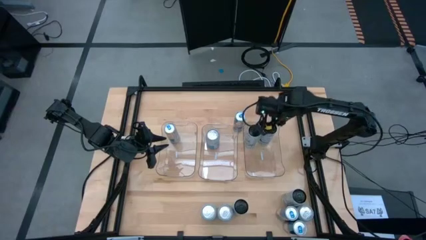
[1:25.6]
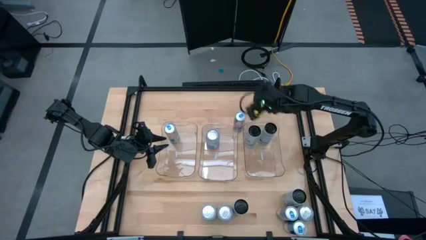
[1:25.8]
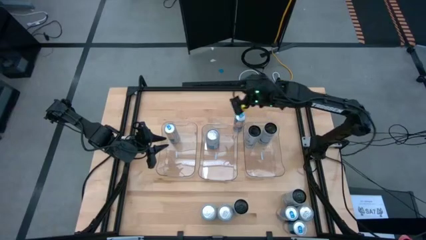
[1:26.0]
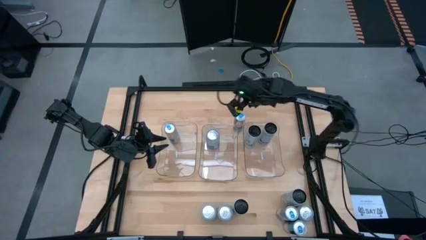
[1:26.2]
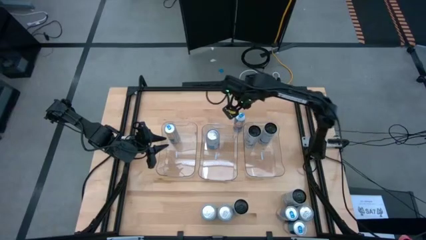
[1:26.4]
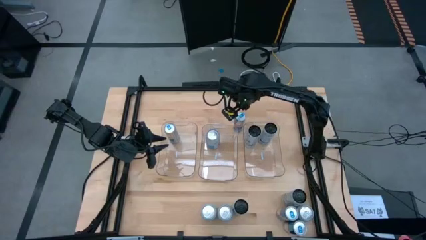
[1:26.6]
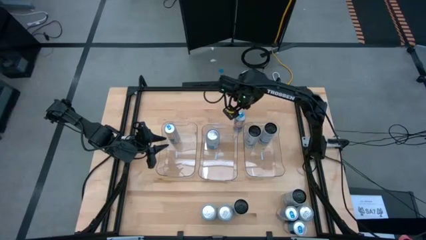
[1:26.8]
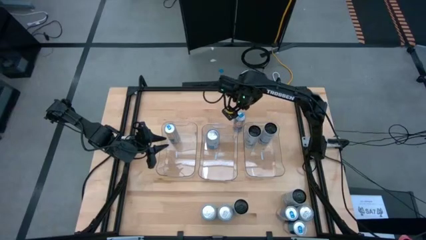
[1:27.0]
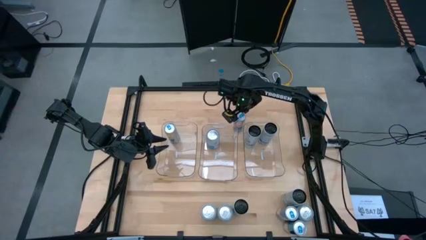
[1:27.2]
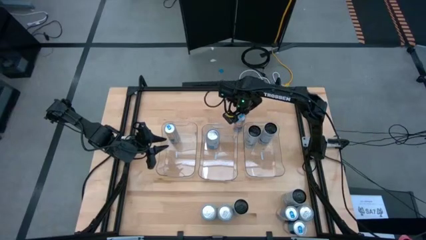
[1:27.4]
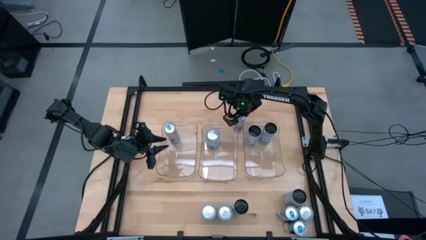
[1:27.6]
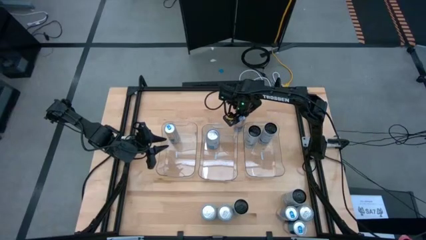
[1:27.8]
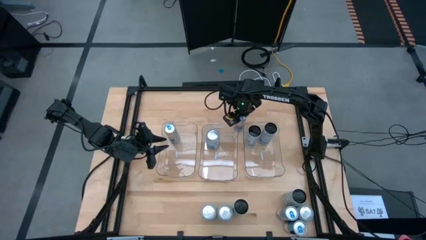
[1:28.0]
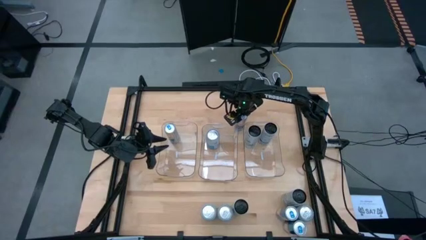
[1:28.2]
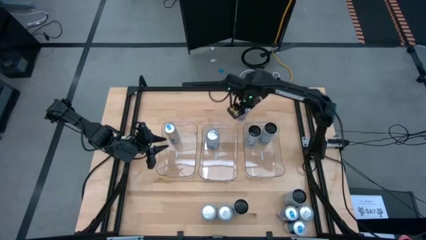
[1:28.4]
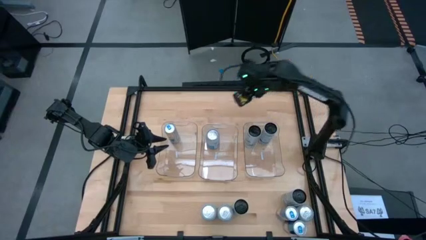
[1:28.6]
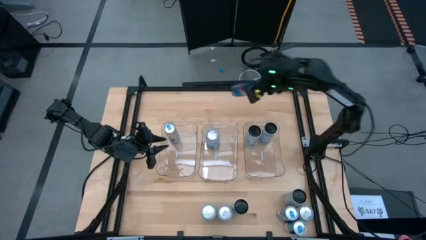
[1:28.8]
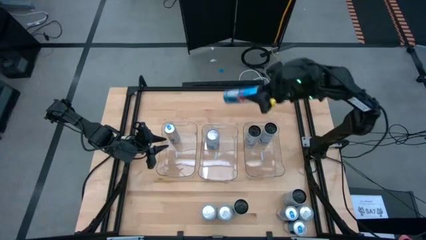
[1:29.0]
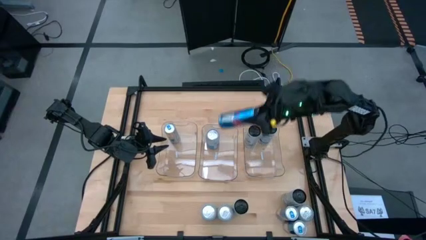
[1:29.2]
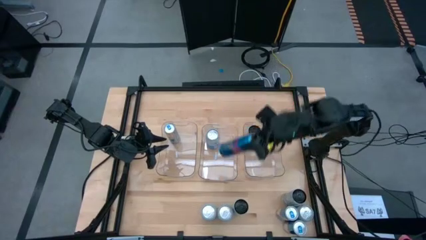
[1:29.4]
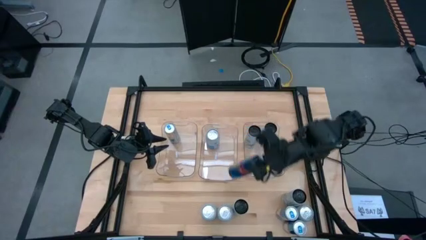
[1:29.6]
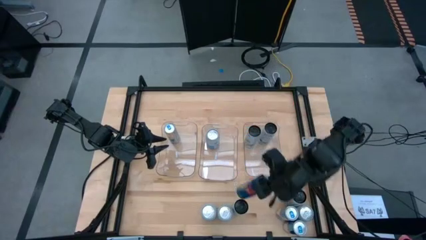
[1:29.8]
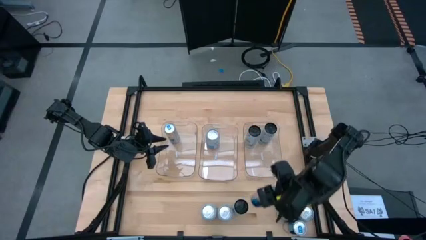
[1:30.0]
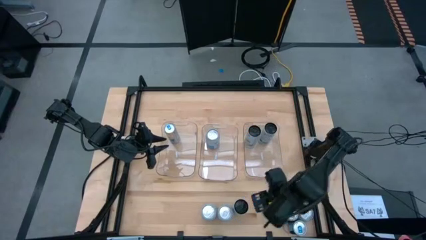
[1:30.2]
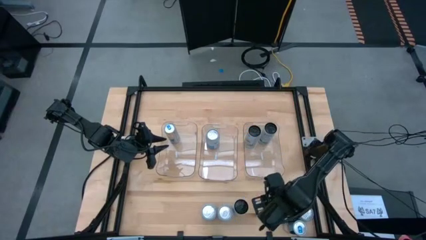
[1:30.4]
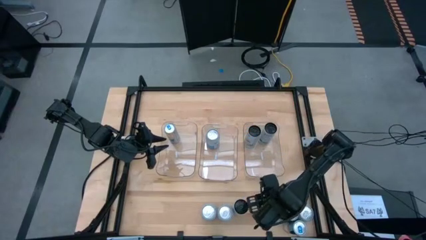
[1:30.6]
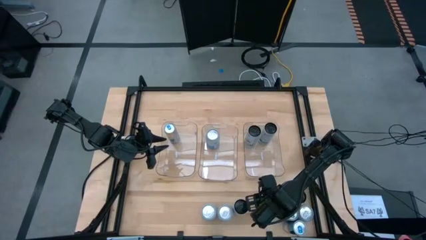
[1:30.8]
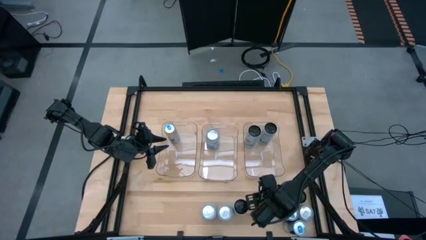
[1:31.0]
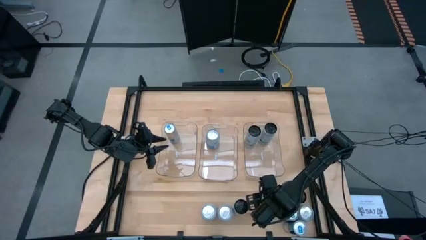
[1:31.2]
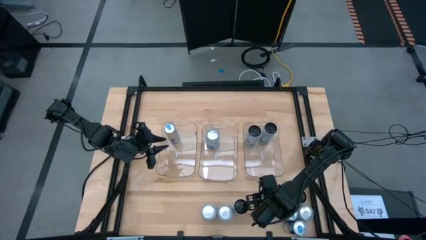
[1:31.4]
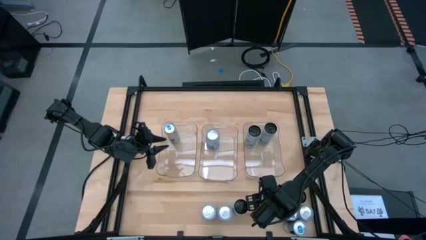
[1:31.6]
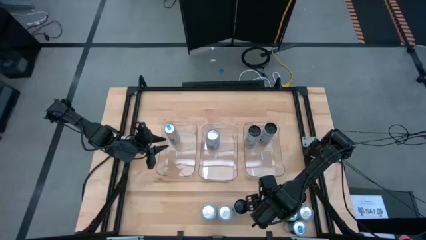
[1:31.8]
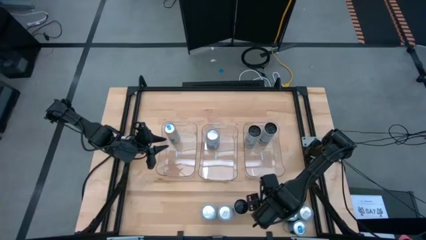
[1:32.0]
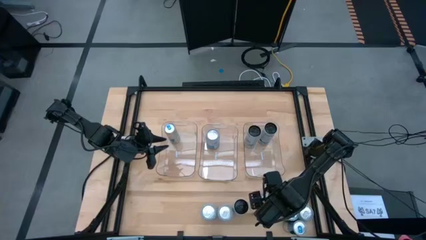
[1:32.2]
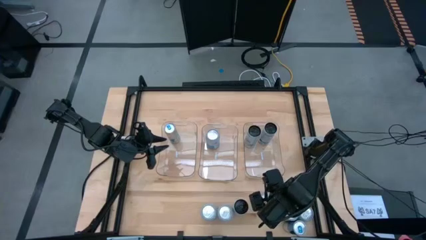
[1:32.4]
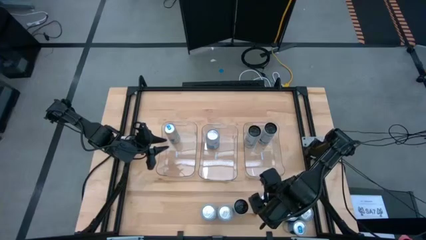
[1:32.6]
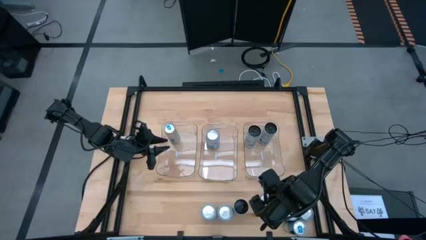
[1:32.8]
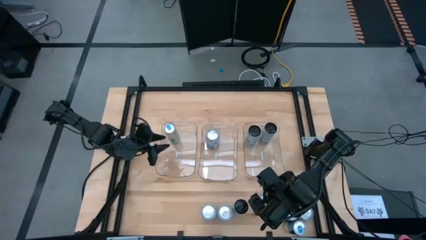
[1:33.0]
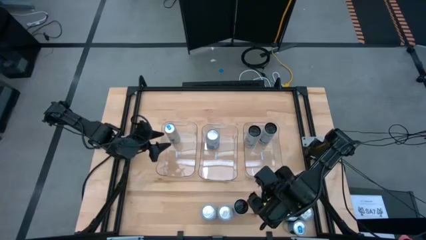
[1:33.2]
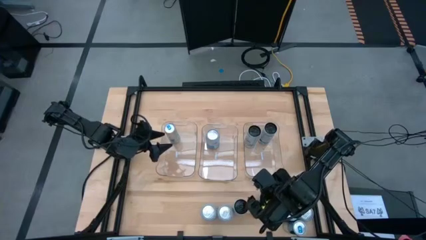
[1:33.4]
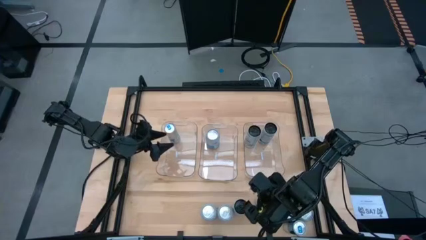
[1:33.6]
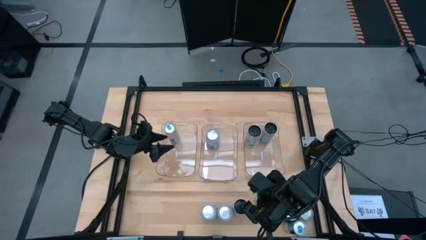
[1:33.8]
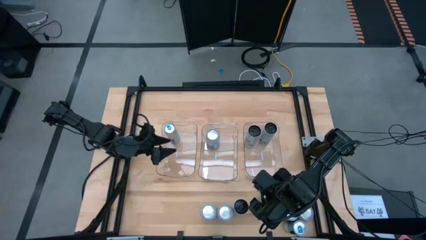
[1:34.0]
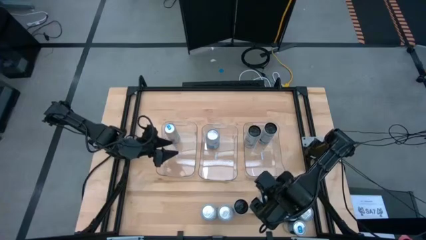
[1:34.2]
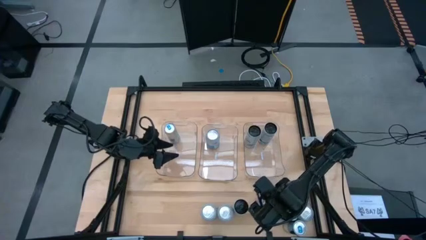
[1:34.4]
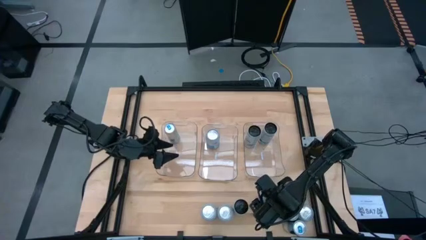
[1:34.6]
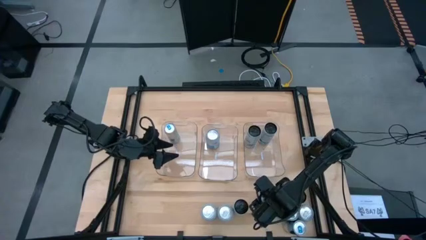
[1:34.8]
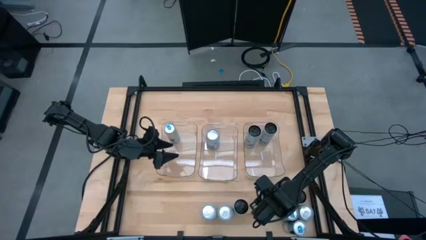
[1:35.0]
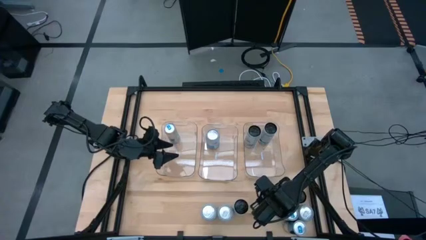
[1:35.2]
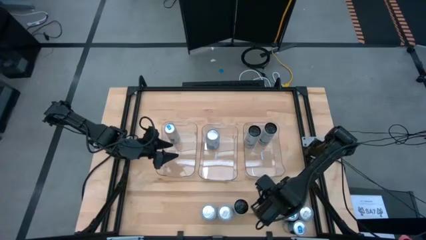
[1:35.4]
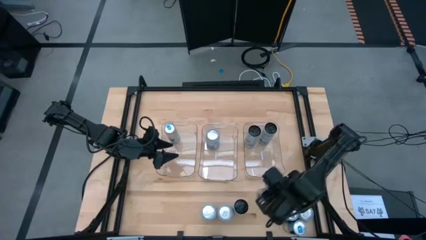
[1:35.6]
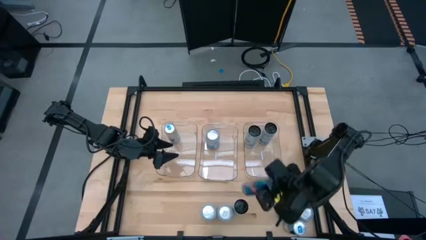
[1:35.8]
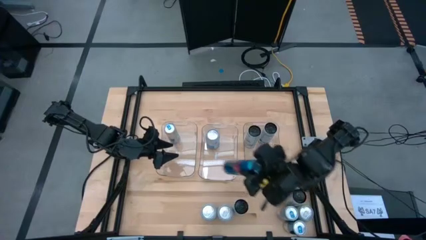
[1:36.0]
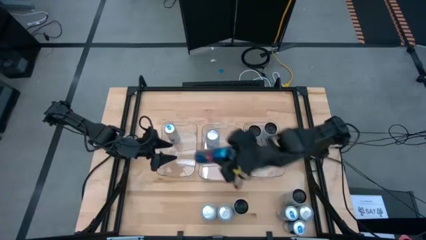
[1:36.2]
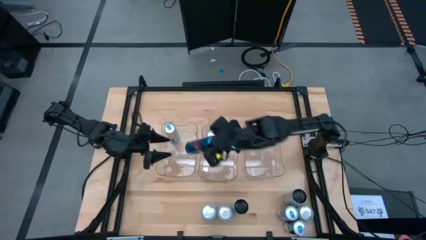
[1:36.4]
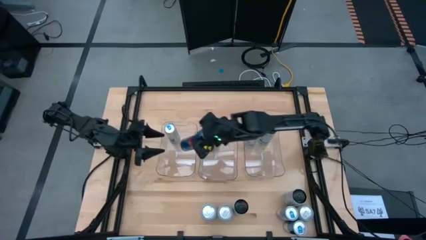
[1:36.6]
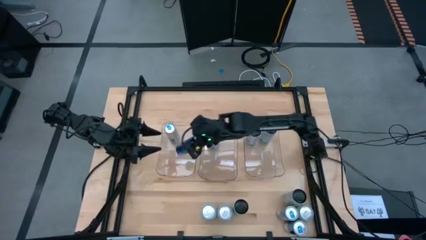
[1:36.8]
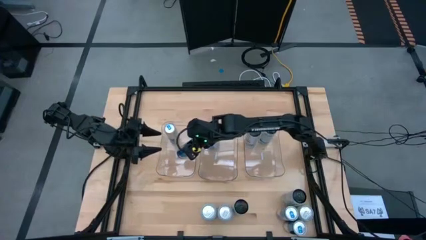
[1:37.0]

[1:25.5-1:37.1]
Task: Sort soda cans
Put the top blue soda can into the left transparent bin

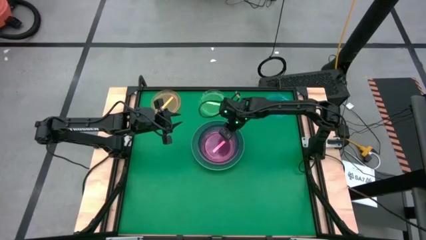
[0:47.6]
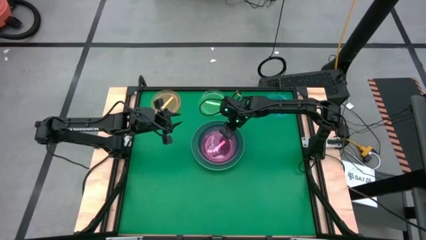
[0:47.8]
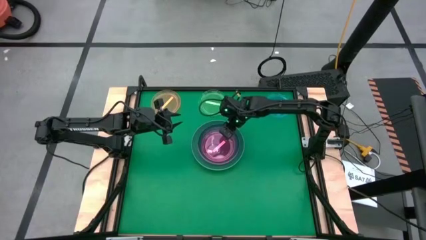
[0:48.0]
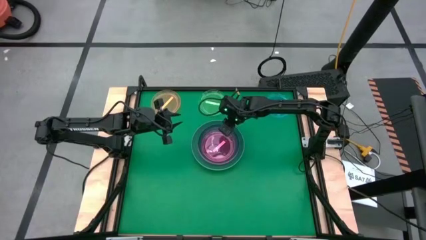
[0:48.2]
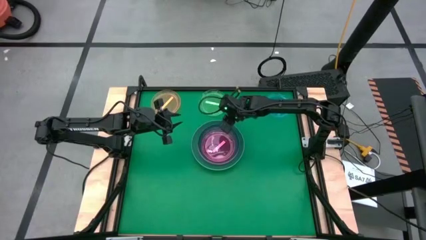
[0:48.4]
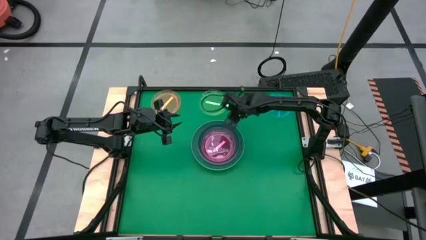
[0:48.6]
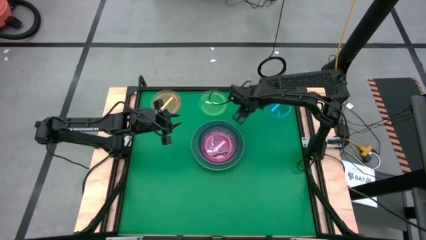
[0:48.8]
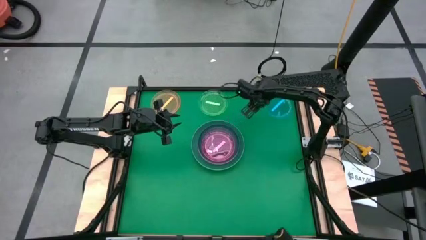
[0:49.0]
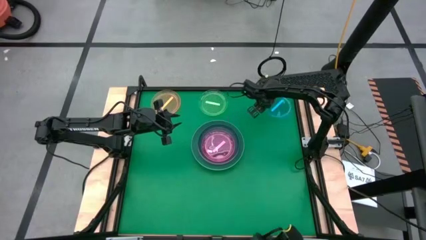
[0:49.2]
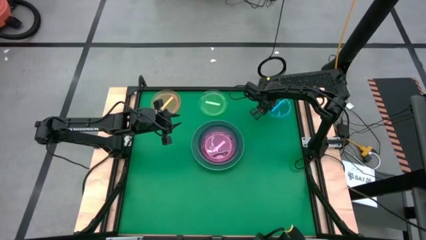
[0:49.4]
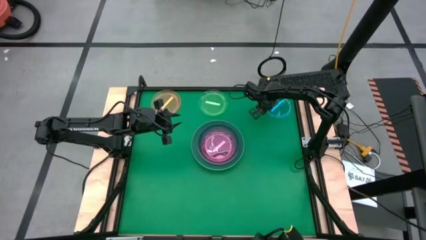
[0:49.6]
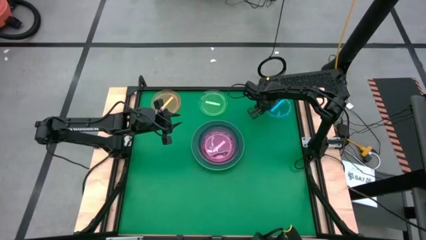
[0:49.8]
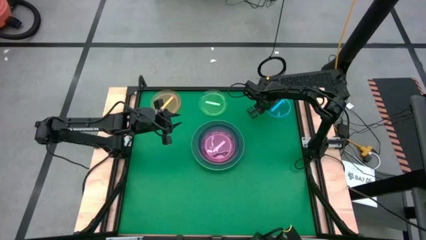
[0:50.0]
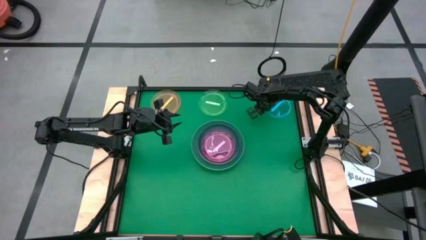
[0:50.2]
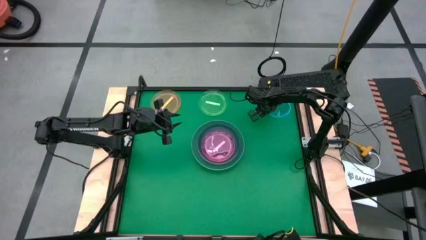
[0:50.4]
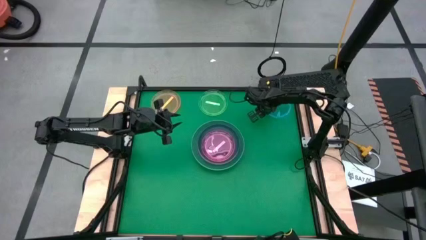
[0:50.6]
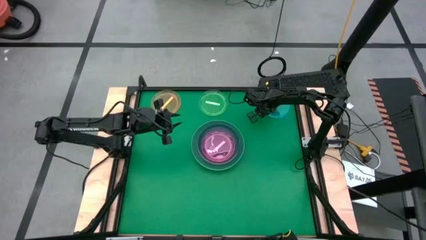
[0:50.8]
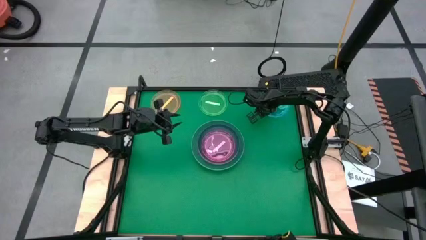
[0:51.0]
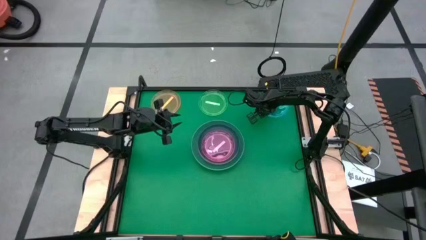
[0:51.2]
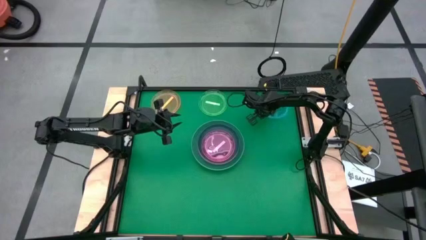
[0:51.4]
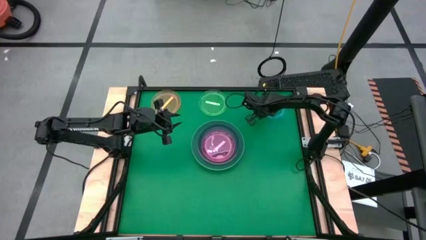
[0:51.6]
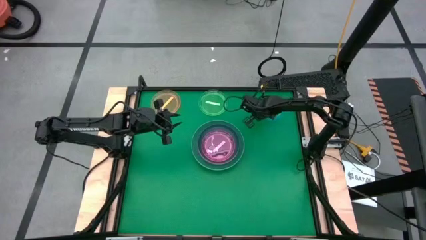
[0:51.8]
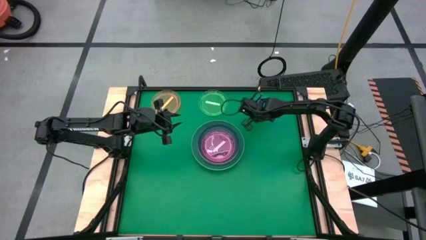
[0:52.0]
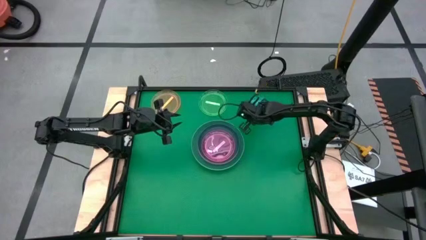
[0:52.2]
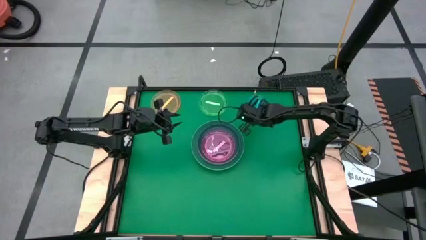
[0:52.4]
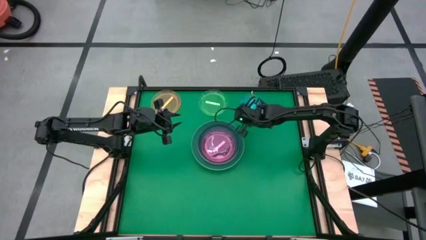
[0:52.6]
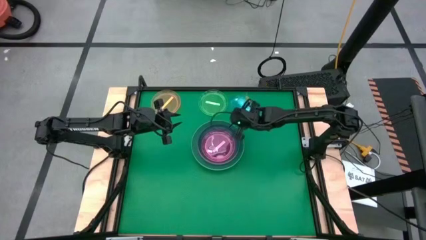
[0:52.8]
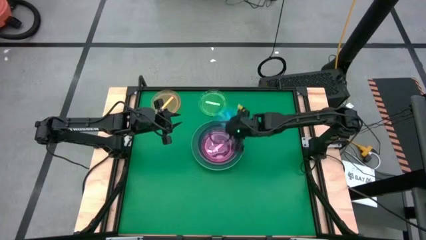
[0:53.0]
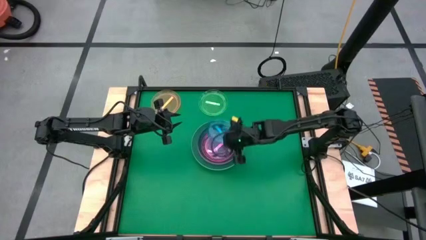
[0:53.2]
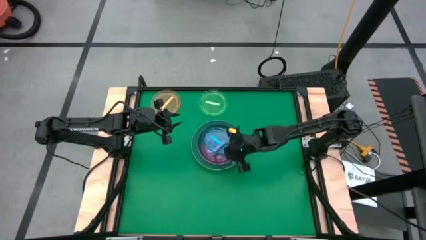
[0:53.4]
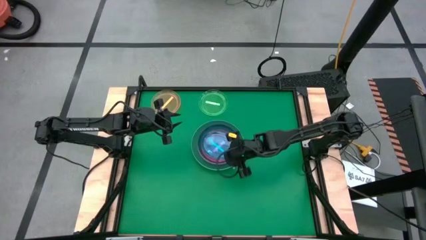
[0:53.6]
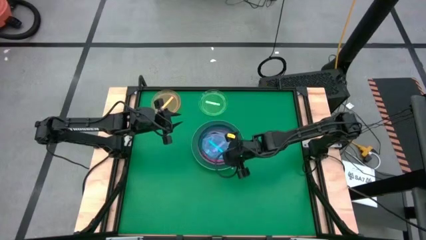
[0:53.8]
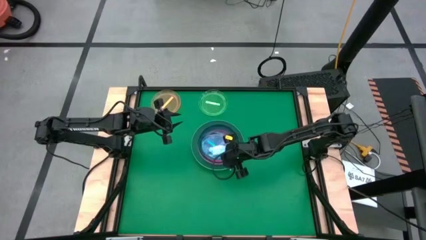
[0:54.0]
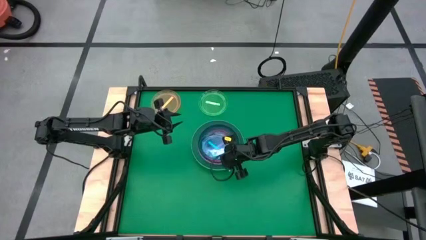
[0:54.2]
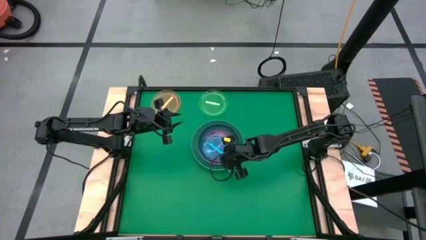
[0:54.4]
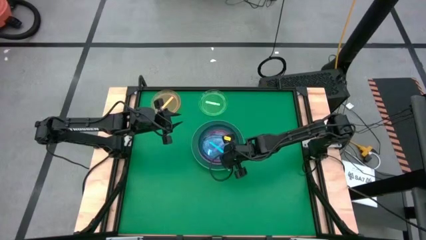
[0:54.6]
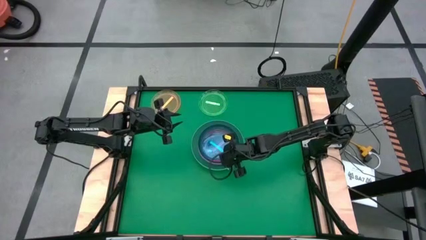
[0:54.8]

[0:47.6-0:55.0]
Task: Stack plastic plates
Stack the blue plate on top of the light pink plate
